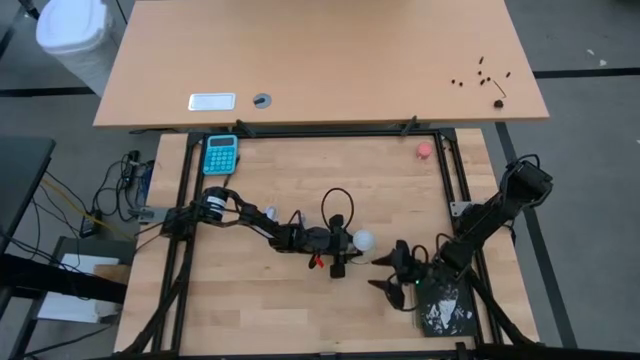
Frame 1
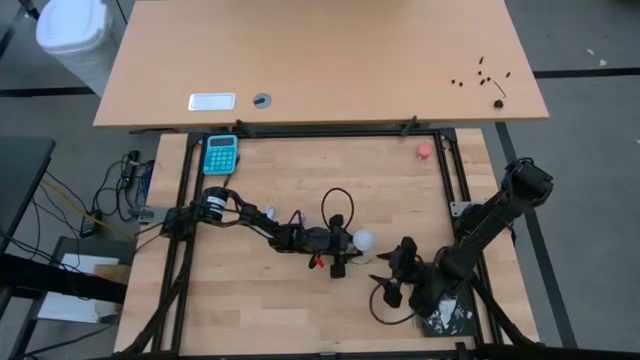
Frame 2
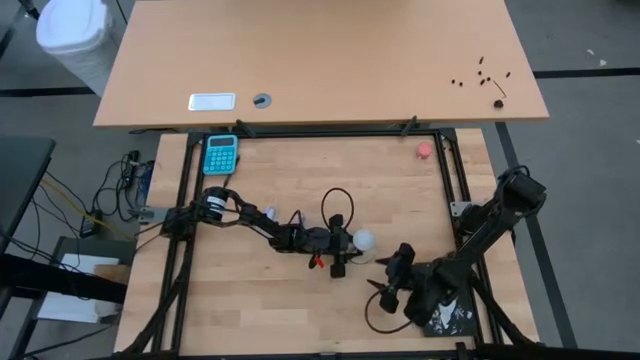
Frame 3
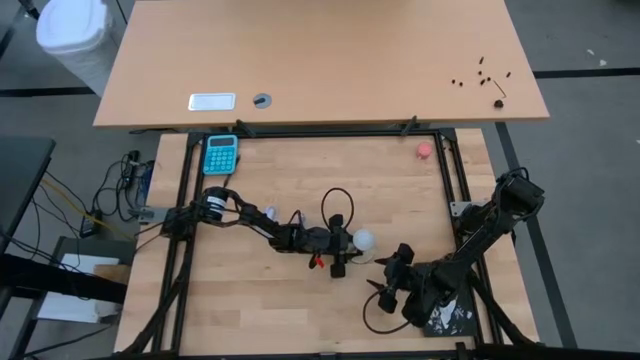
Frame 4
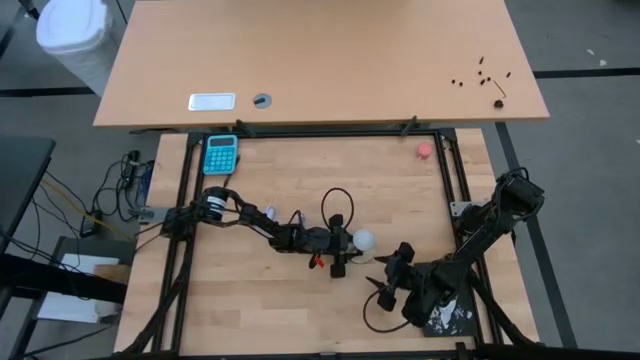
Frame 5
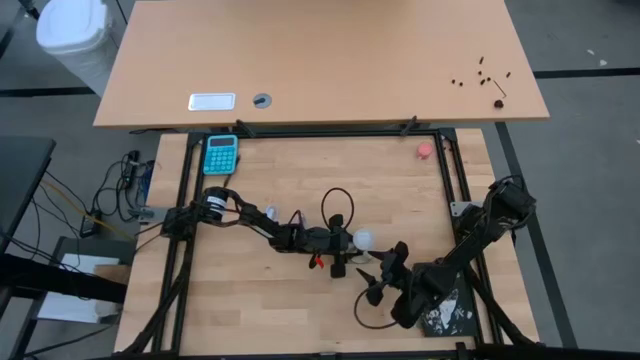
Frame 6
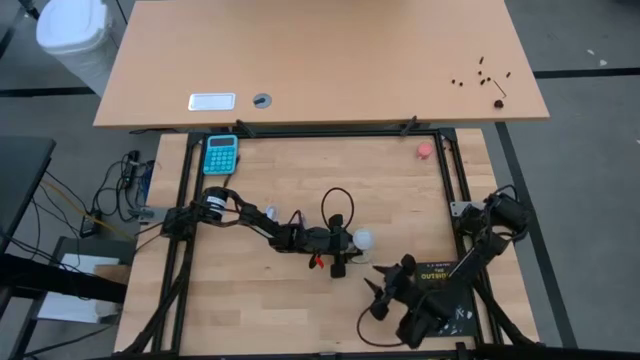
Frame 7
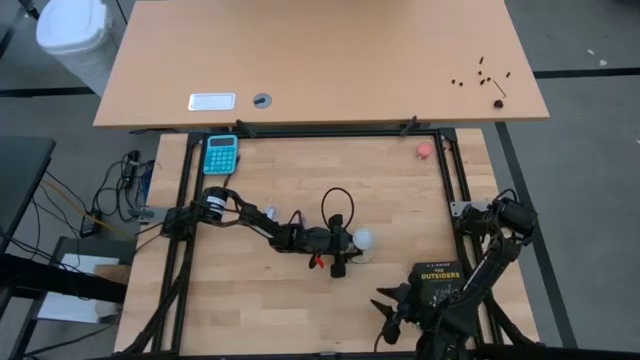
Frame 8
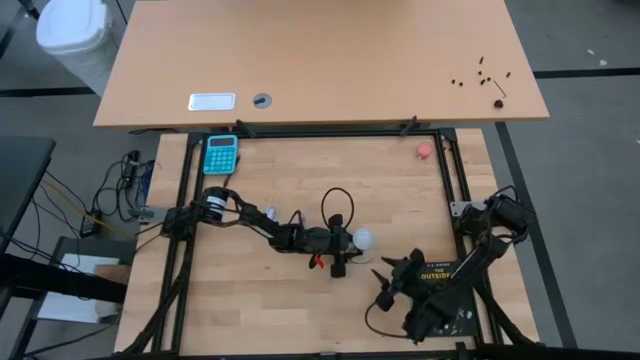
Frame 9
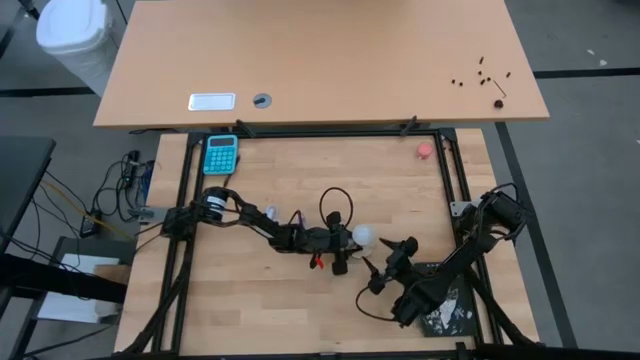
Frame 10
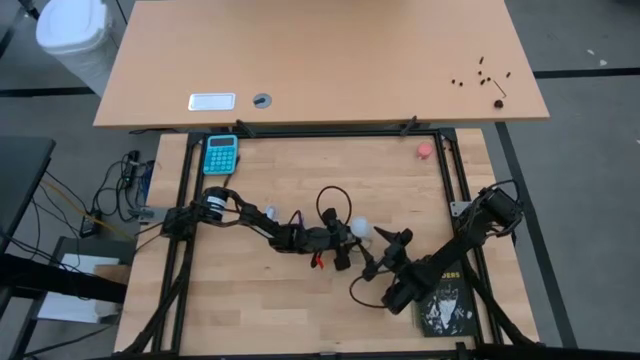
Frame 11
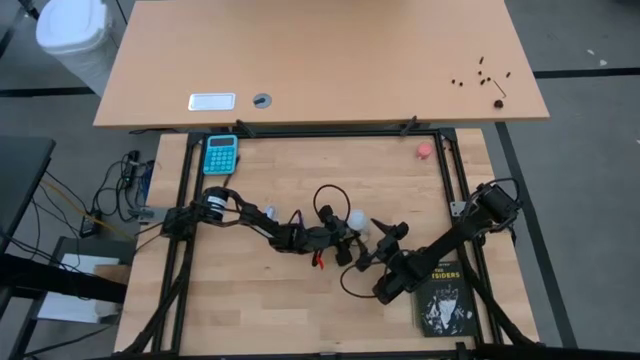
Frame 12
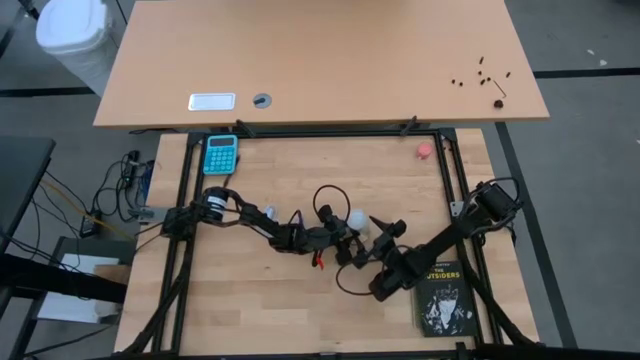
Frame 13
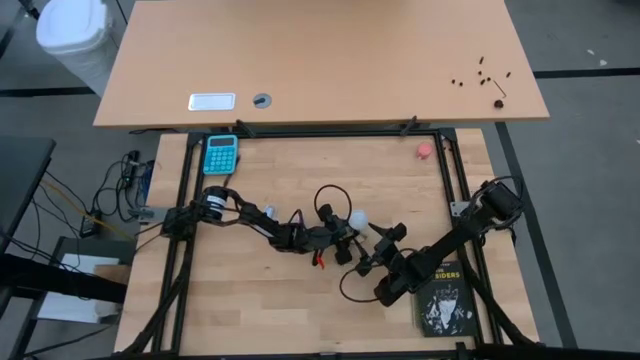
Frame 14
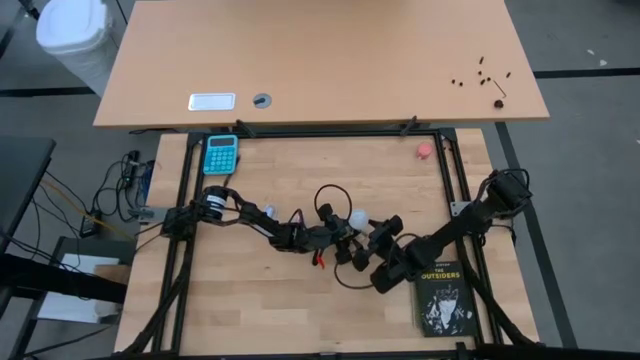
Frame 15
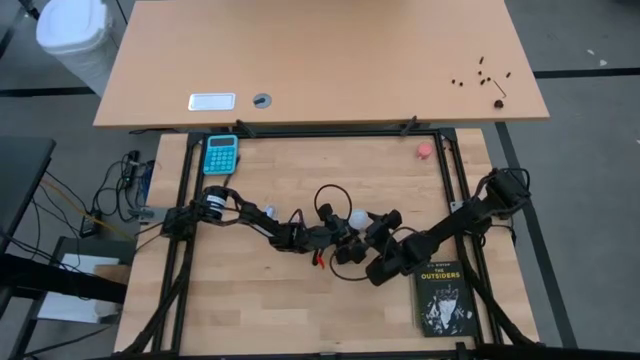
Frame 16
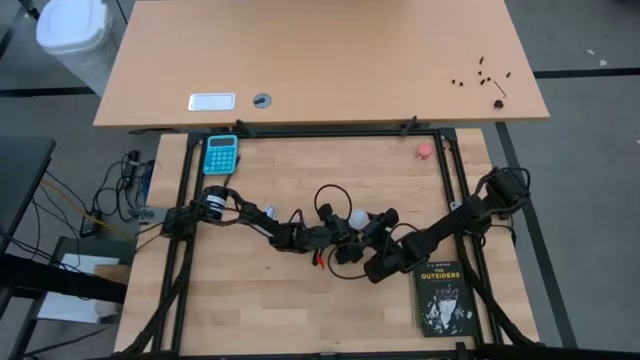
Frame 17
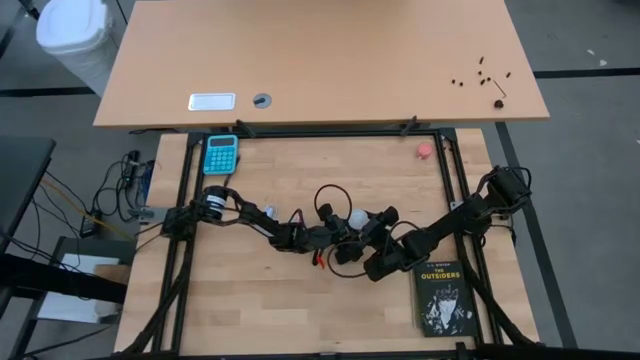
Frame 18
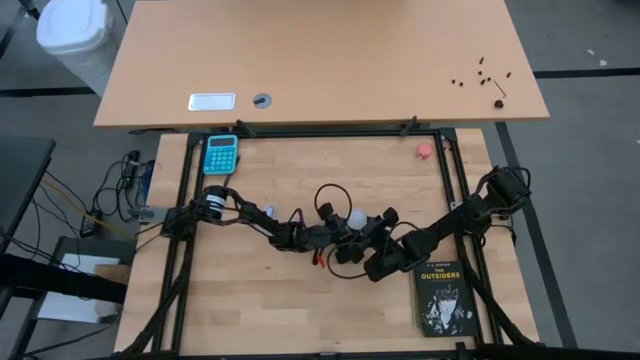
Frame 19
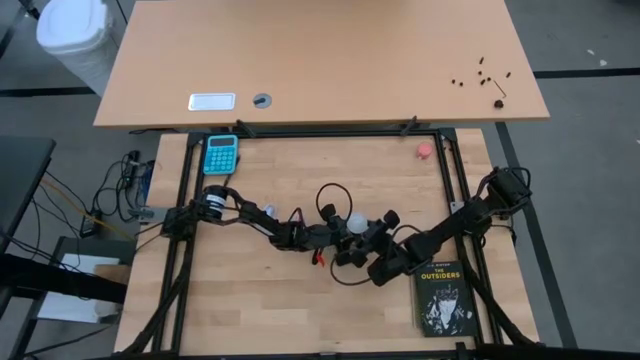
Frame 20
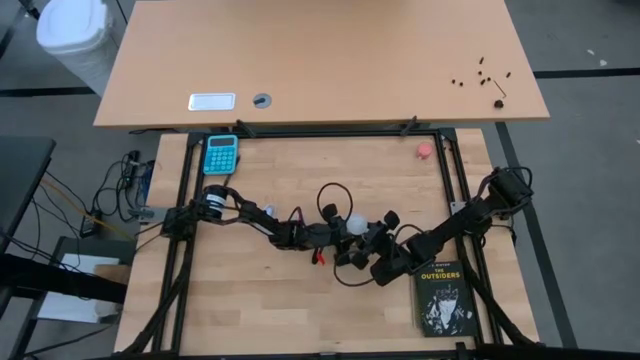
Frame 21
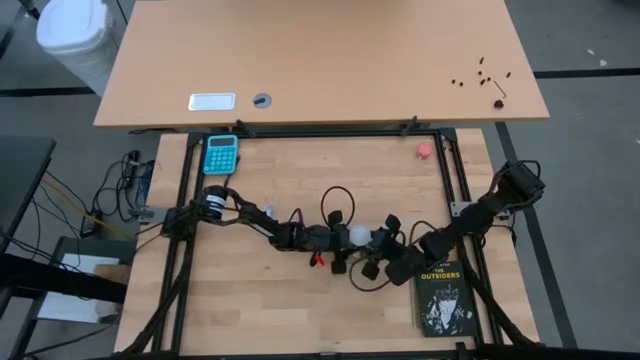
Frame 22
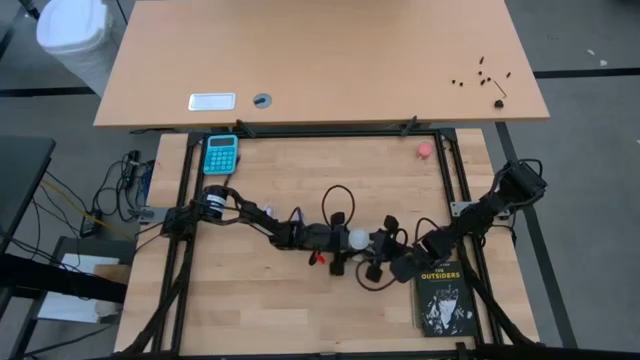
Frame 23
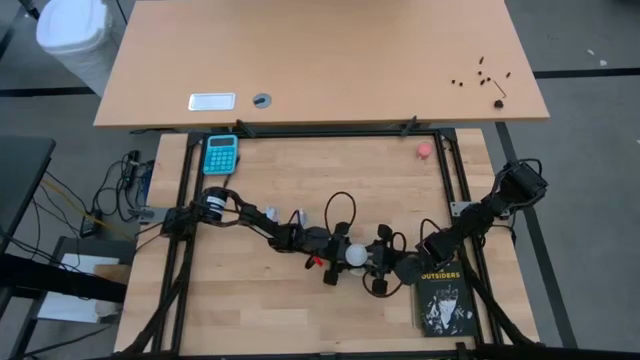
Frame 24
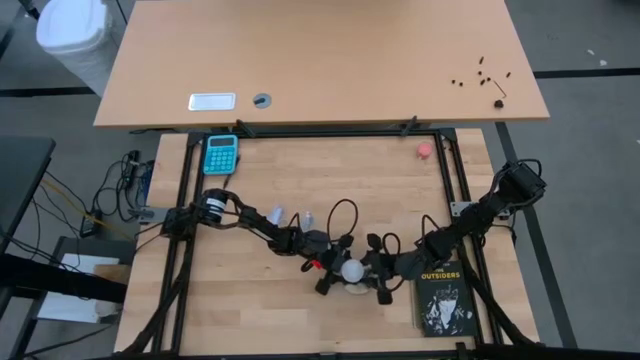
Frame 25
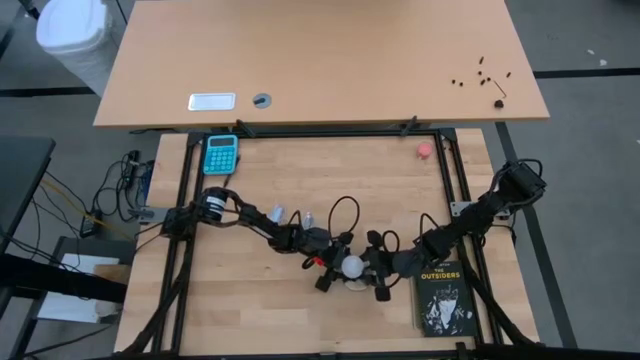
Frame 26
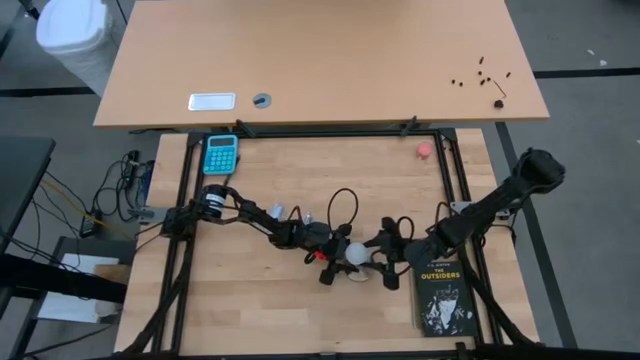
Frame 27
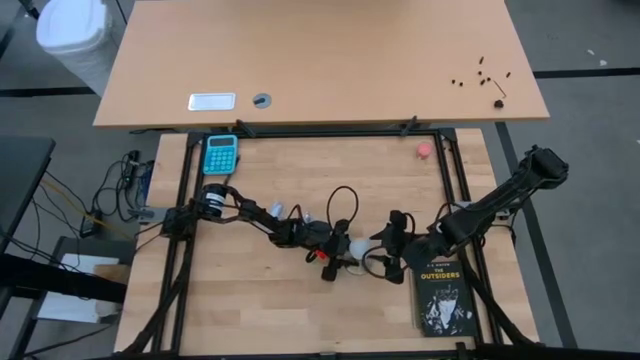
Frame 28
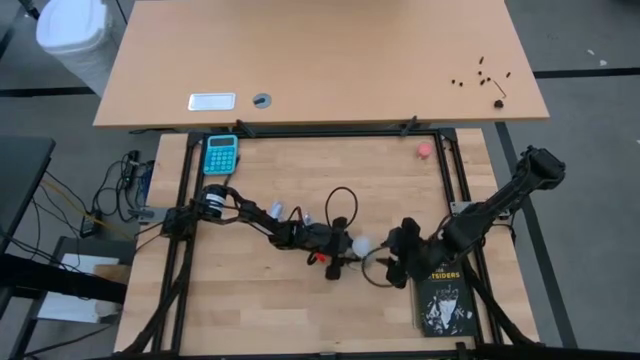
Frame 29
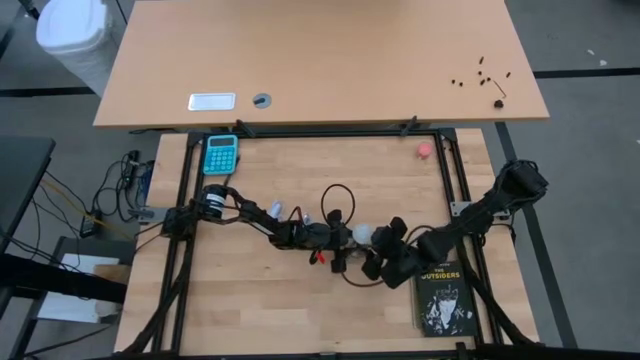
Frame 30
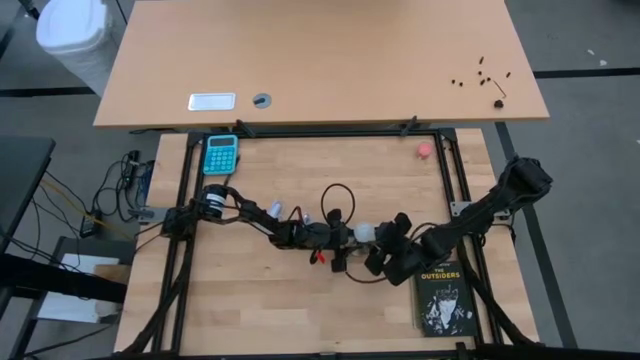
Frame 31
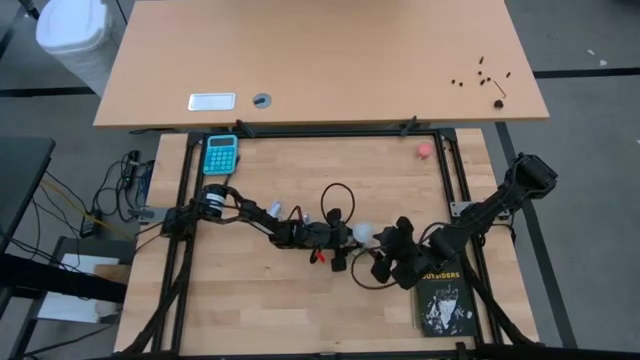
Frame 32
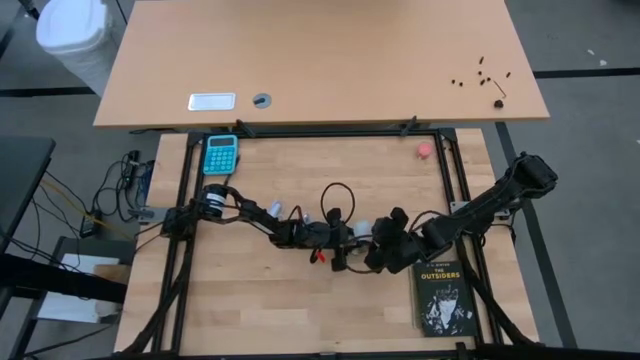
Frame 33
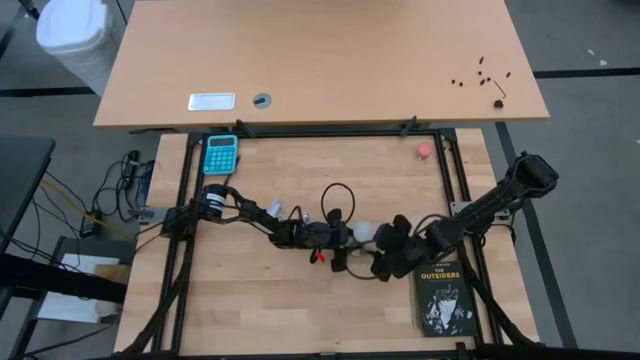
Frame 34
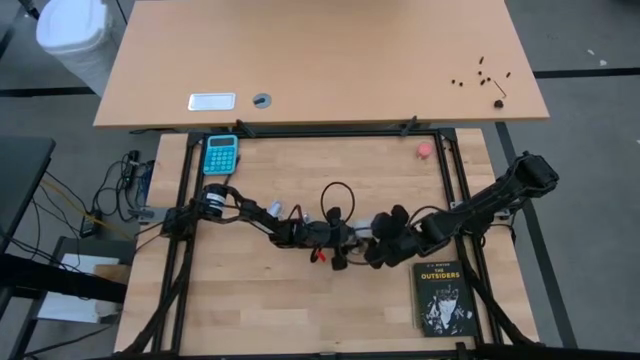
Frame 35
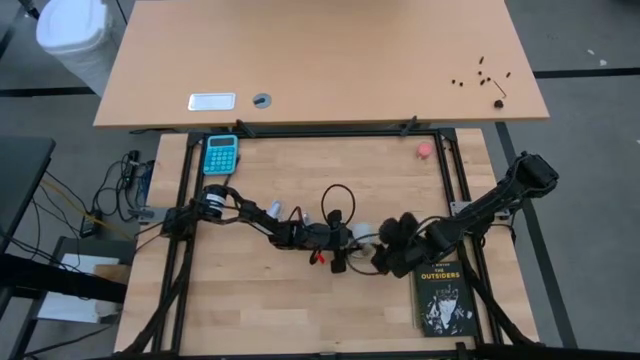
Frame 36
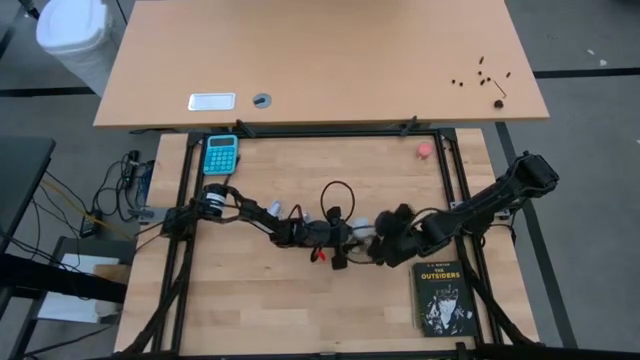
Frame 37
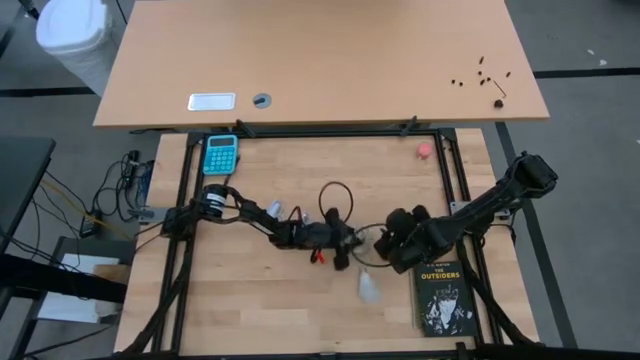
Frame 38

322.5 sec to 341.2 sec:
Task: Screw lightbulb
Remove the lightbulb from the lamp

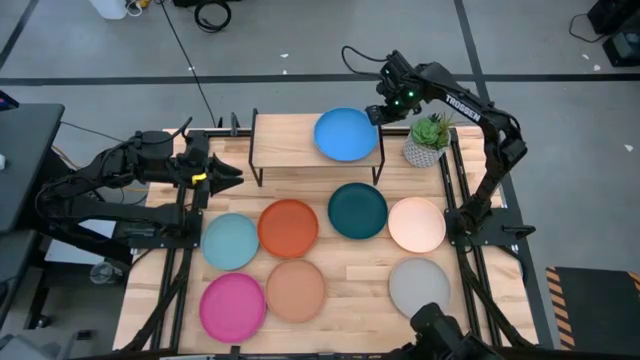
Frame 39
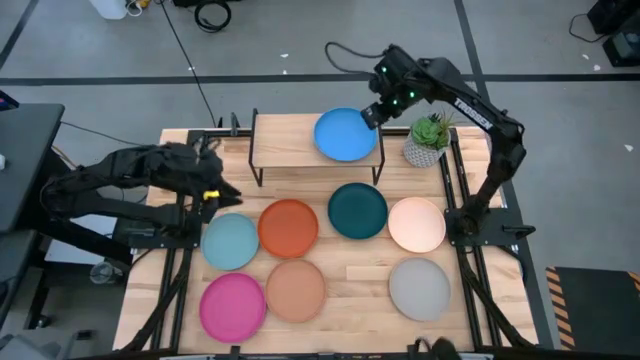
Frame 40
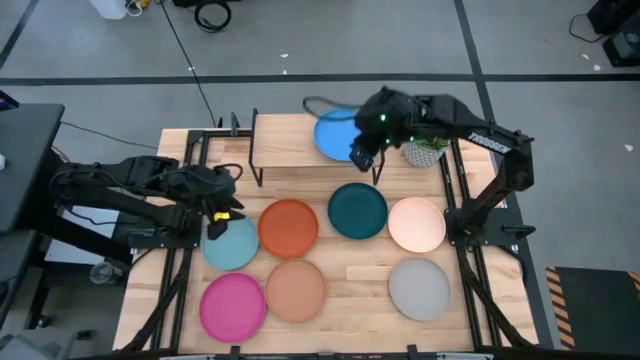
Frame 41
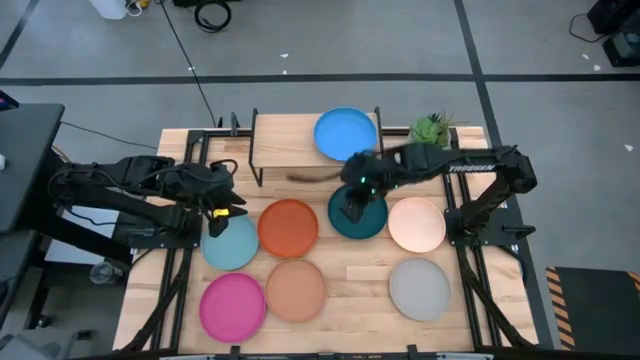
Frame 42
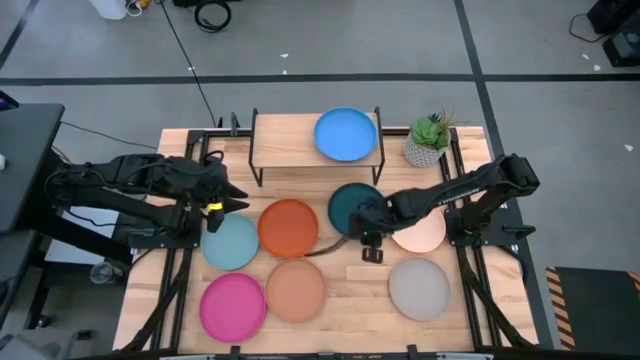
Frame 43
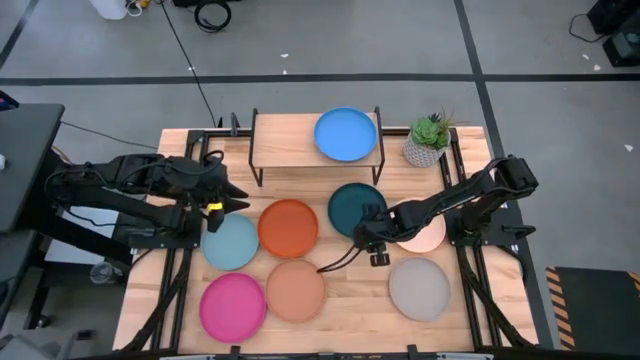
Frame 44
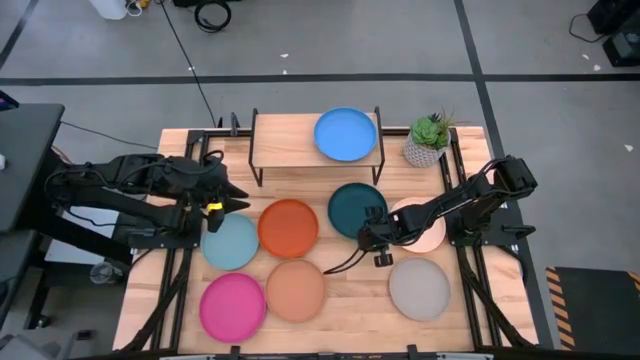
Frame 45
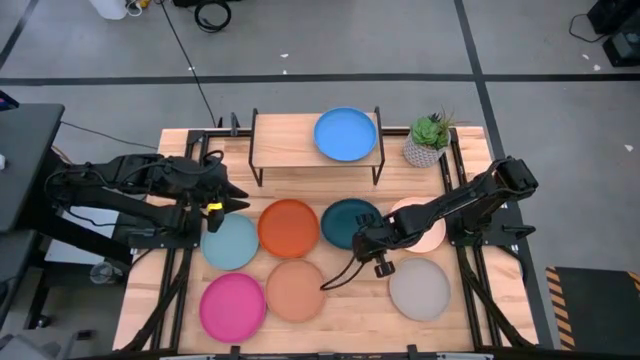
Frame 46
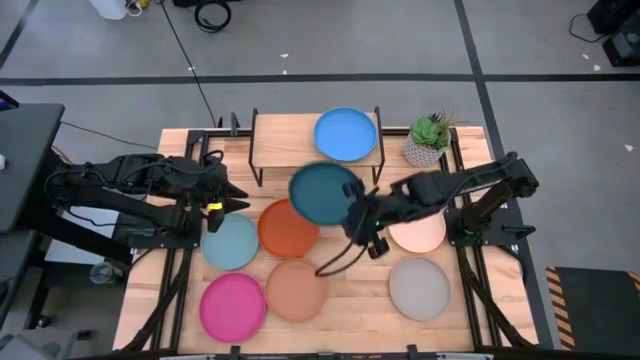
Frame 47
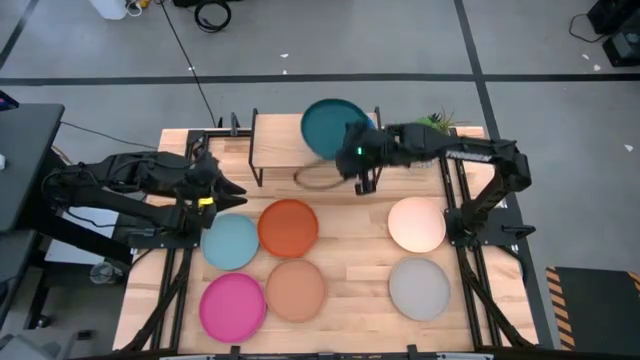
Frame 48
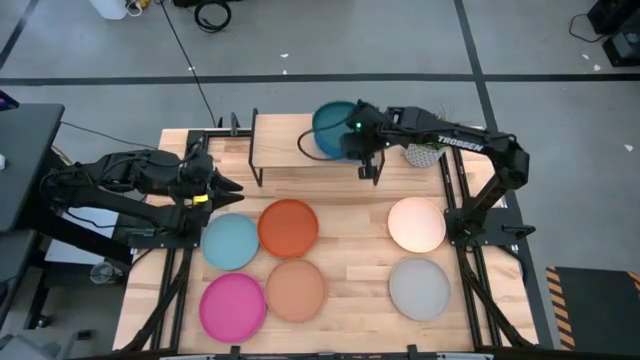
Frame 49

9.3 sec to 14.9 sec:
Task: Place and stack plates onto a shelf
Stack the dark blue plate into the blue plate on the shelf
